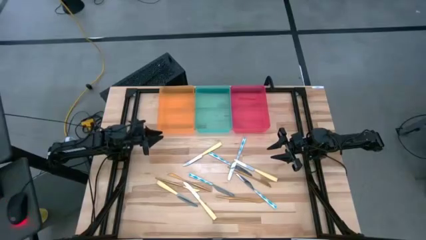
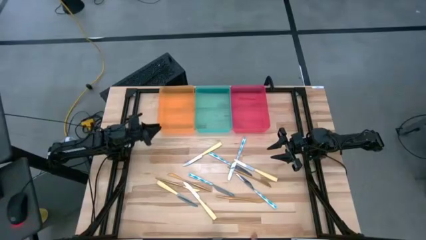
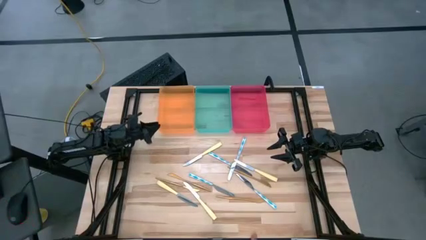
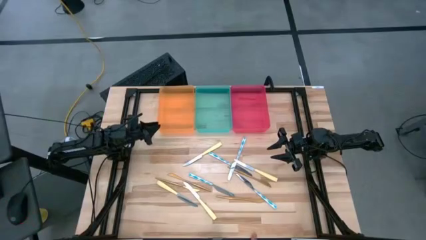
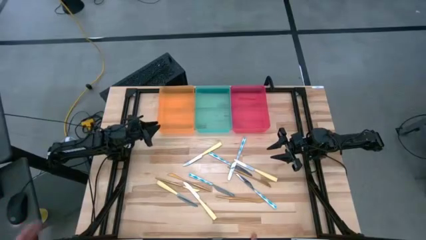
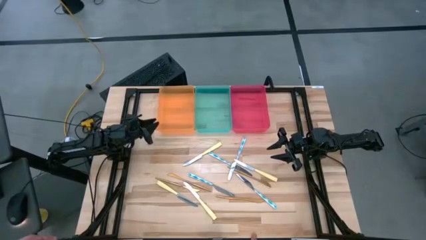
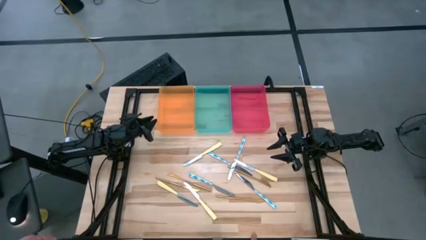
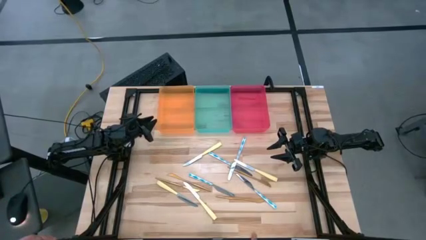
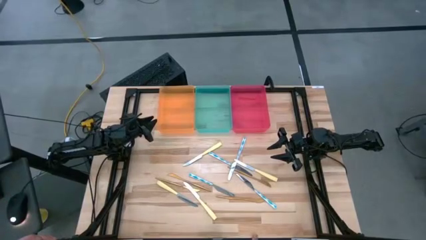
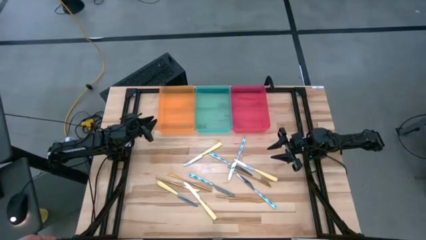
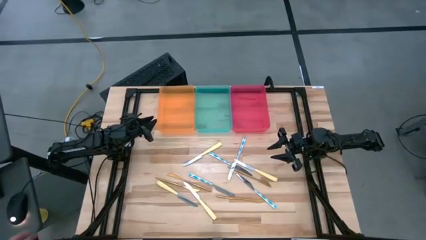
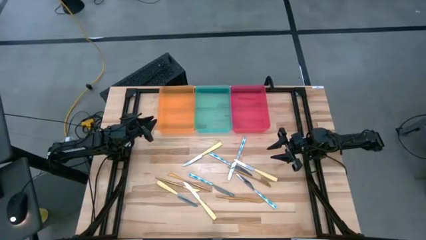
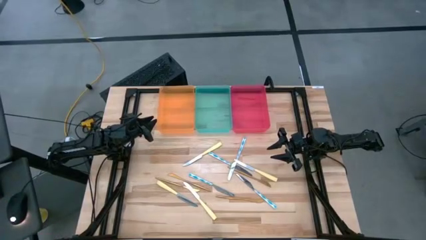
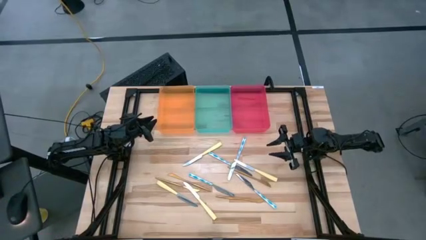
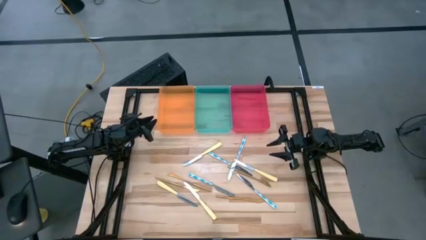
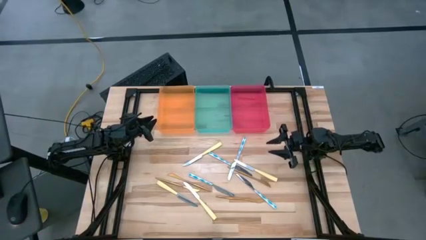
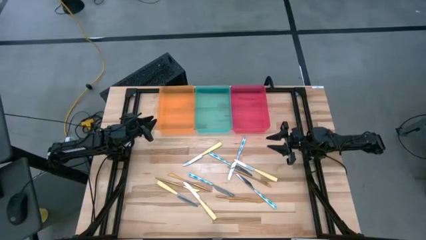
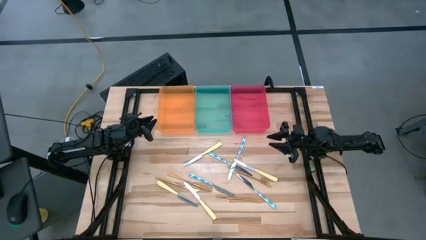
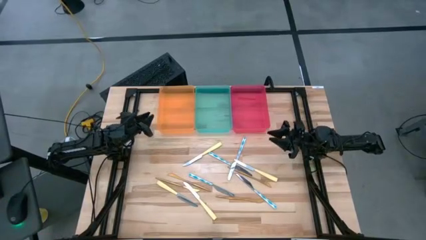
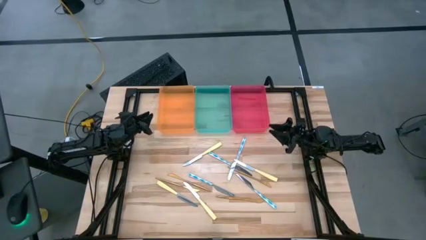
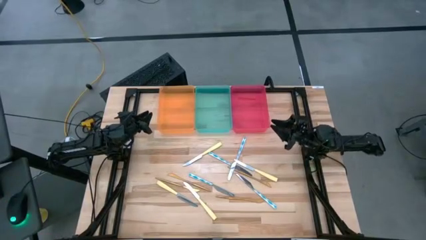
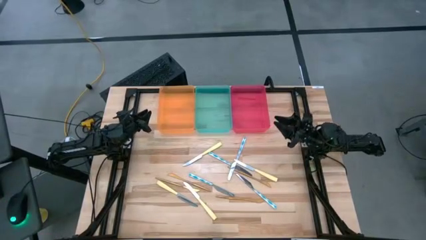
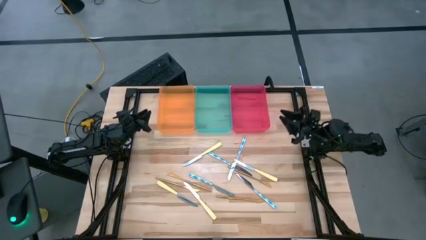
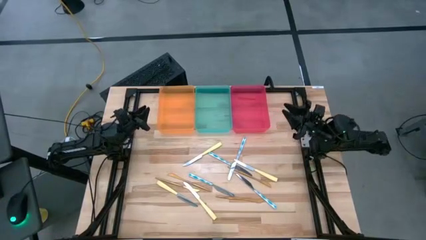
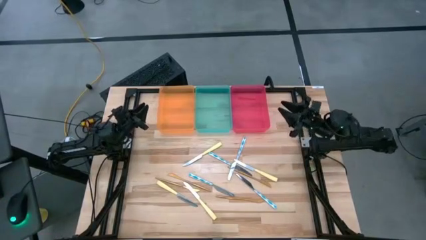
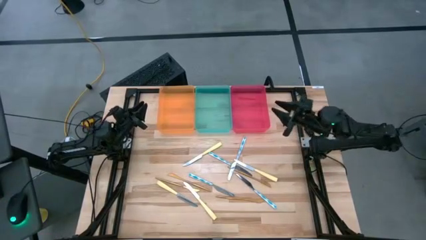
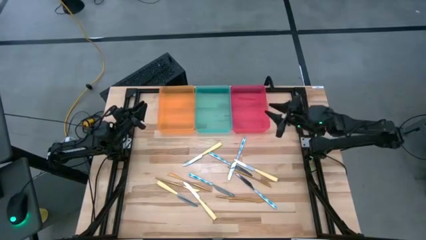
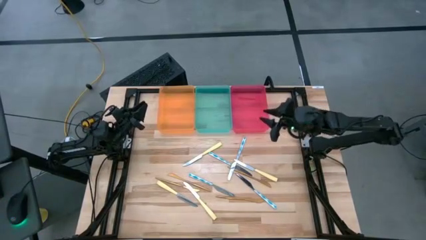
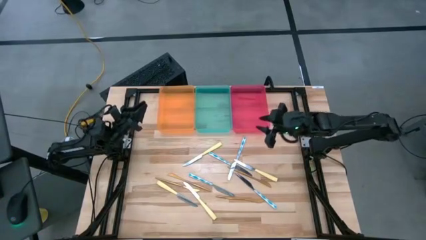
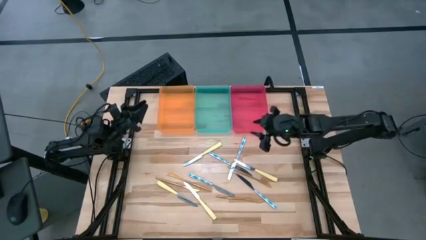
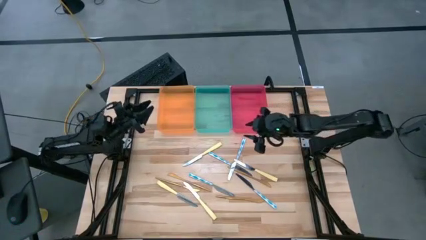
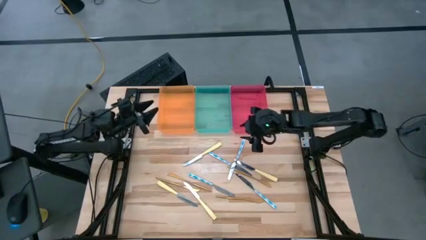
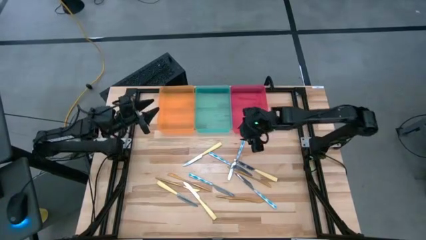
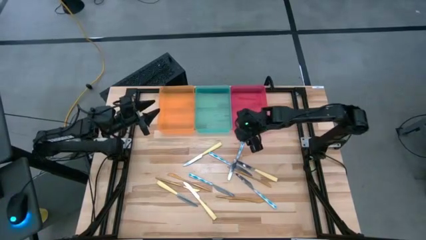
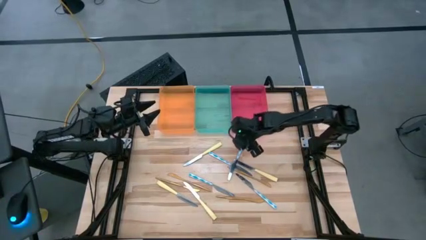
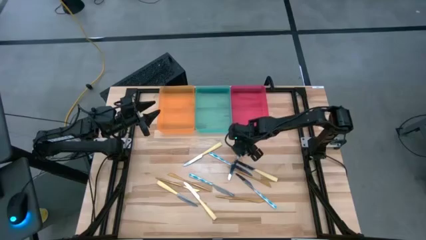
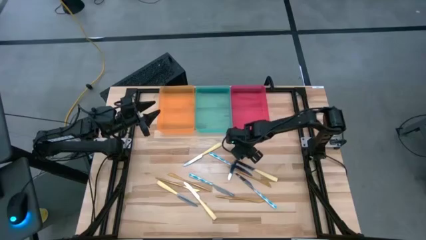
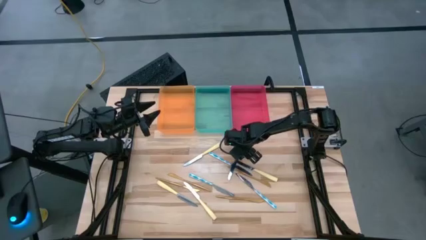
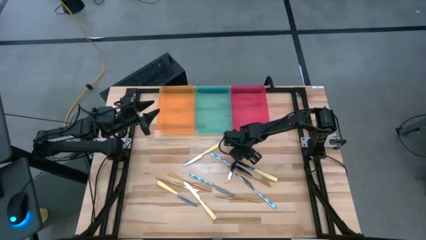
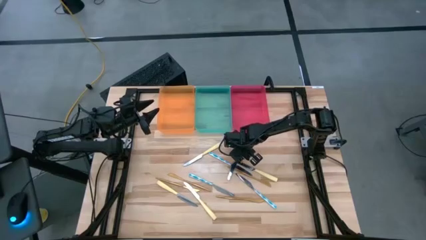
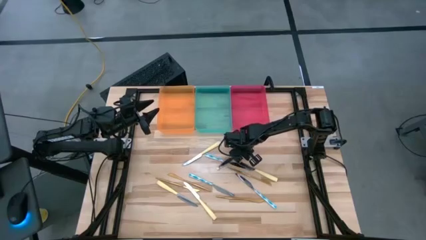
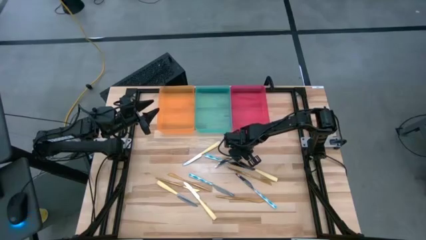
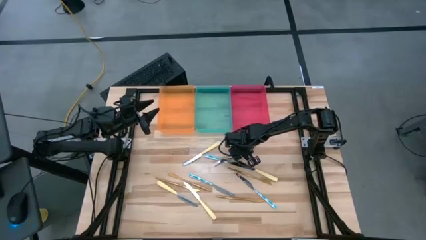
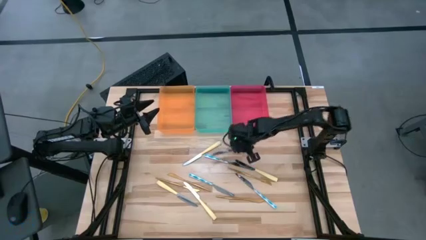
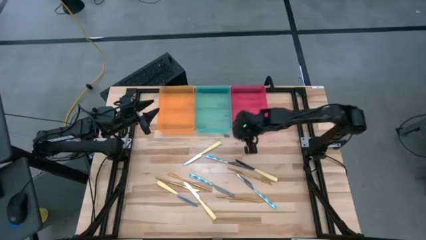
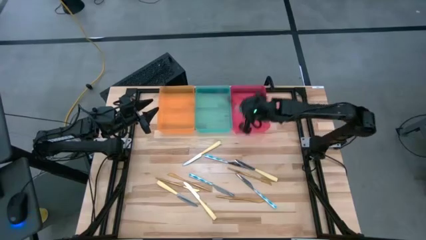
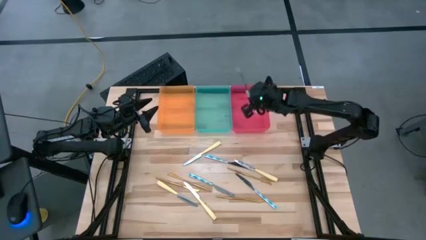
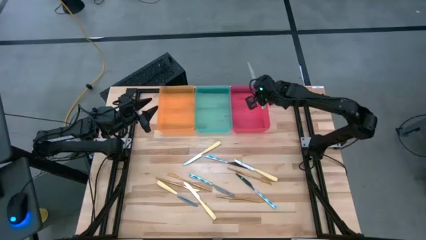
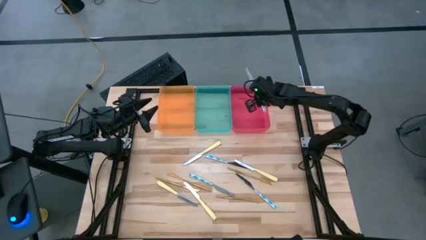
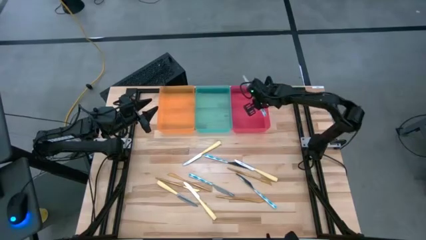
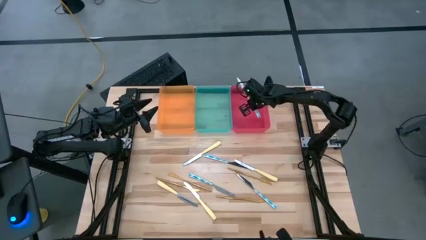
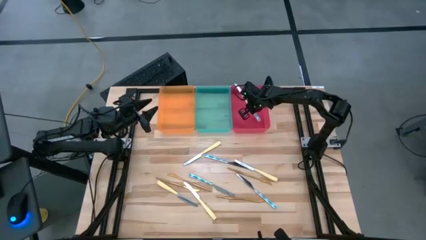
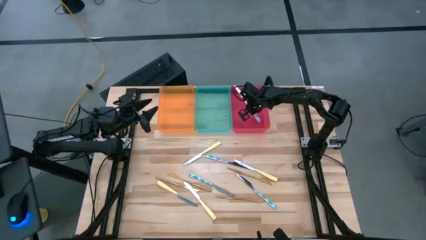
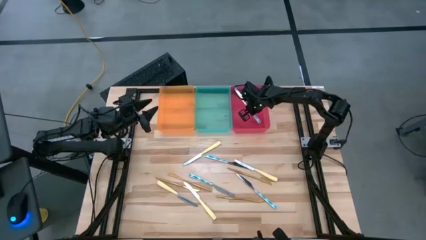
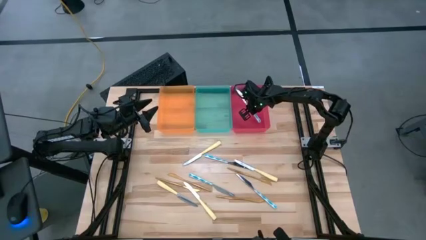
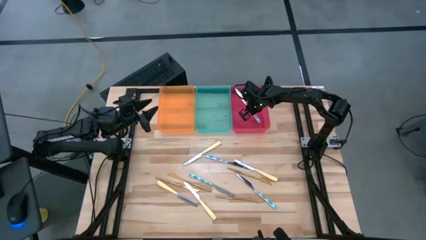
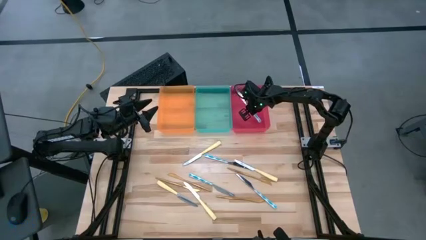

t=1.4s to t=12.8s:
Task: Sort silverware by color (type)
Put the blue patterned table knife into the red bin

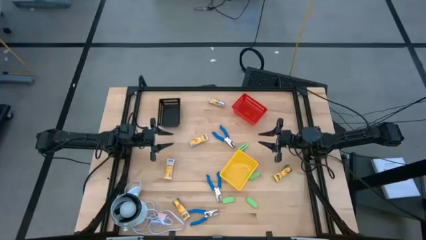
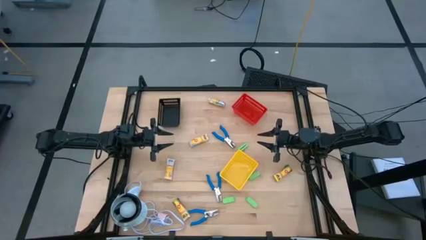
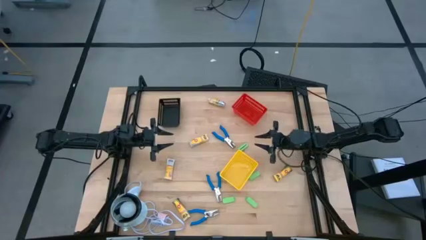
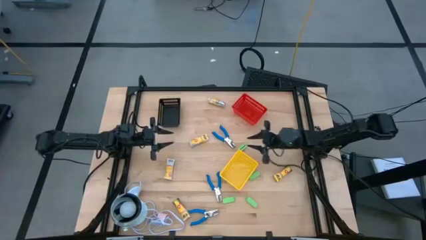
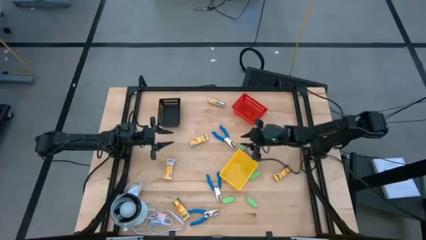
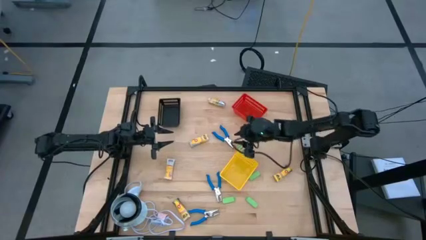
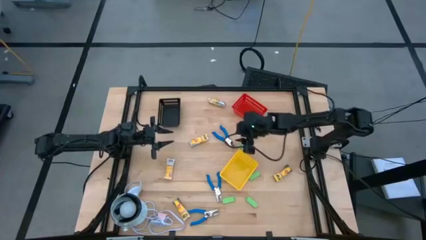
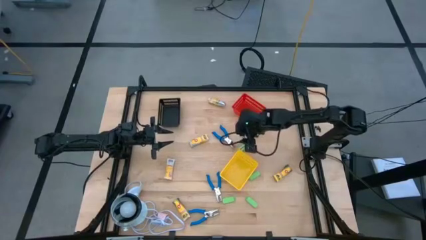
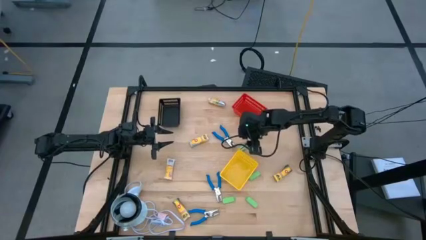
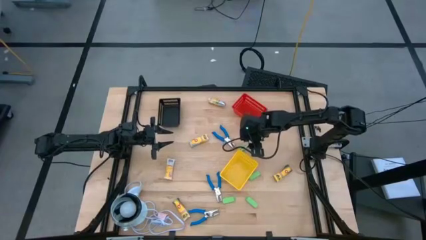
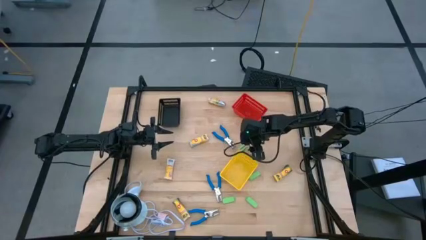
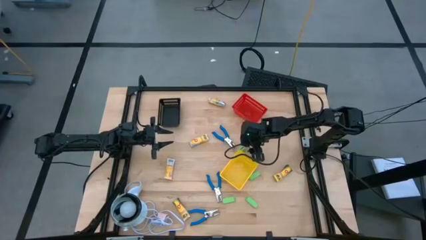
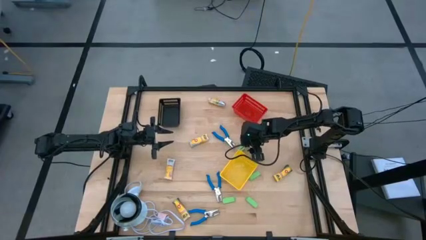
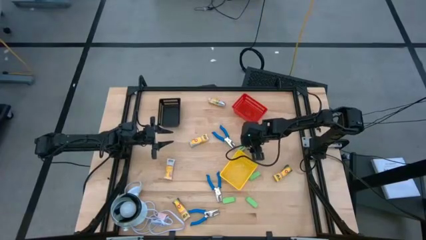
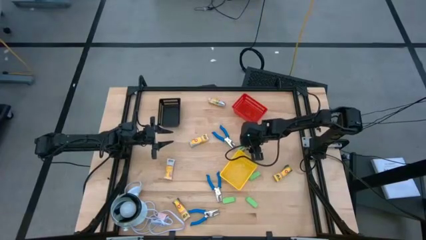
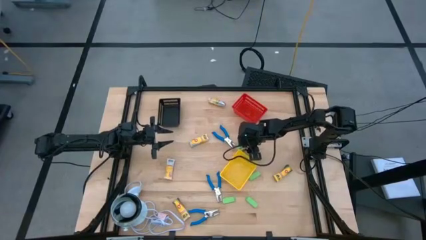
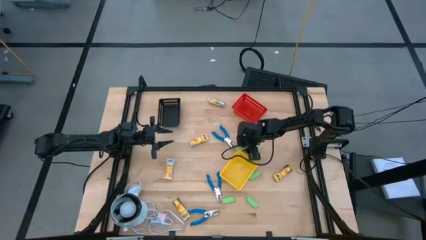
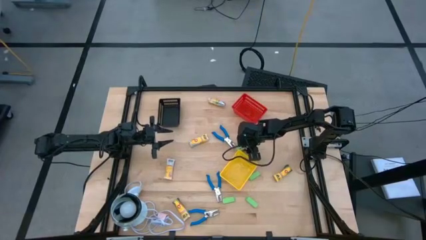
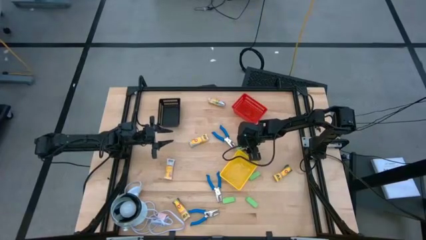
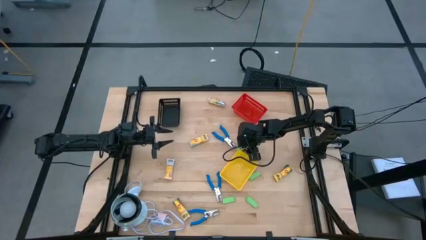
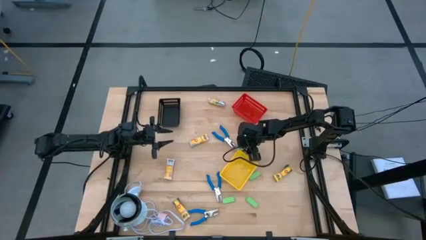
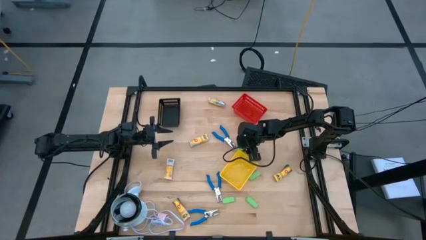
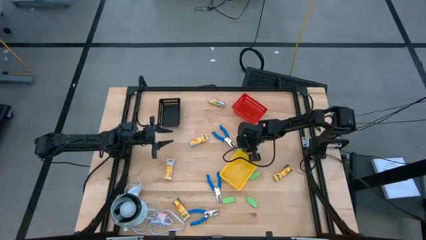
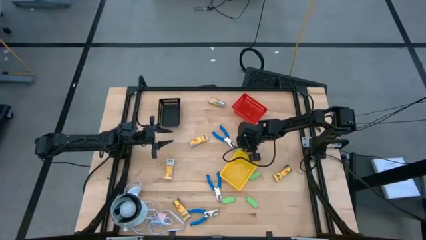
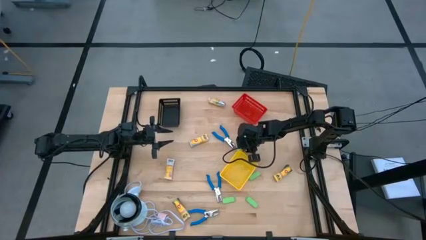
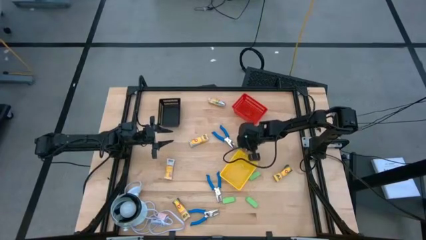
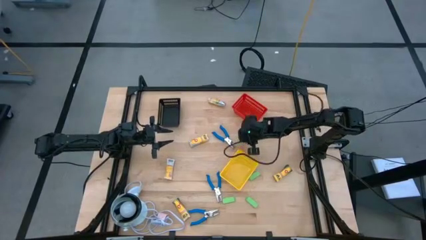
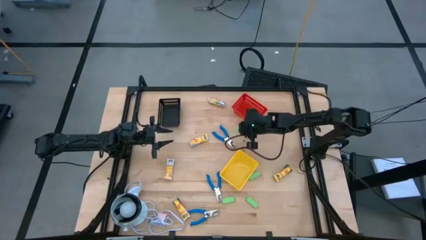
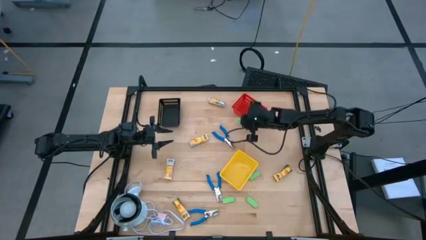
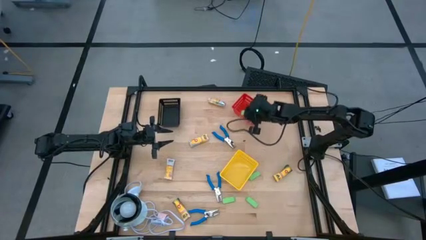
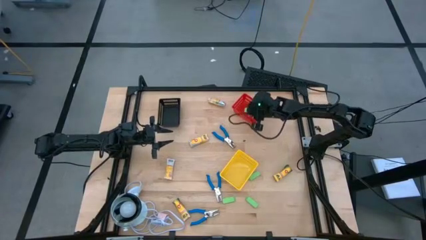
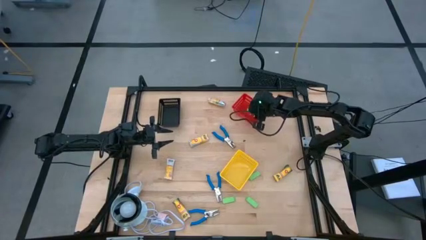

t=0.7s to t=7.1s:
Task: Pick & Place School Supplies
Put the green eraser into the red bin
